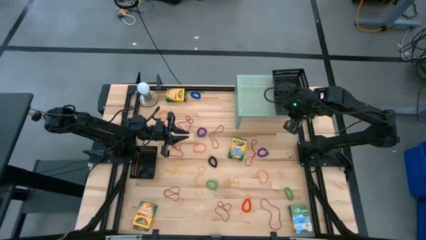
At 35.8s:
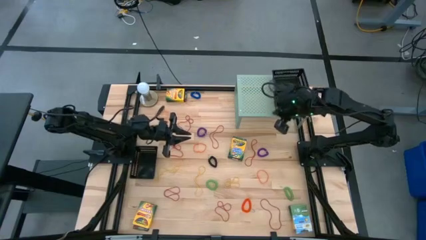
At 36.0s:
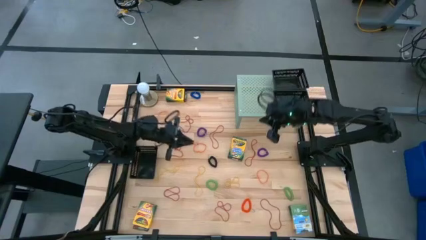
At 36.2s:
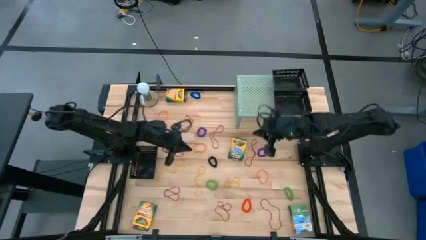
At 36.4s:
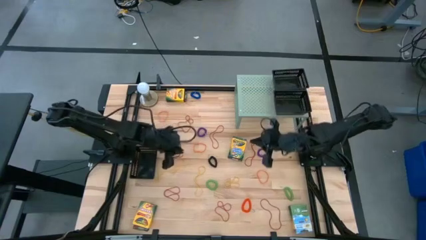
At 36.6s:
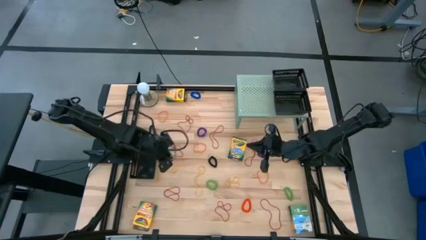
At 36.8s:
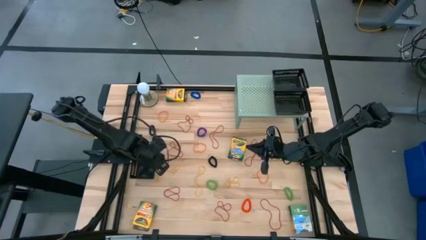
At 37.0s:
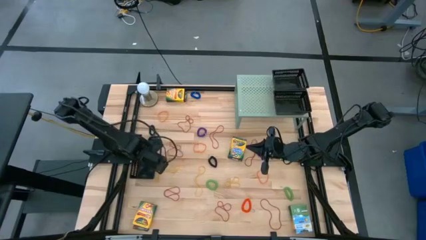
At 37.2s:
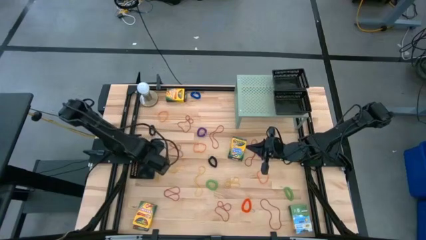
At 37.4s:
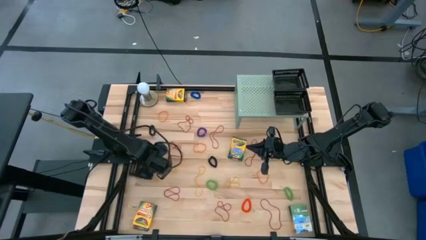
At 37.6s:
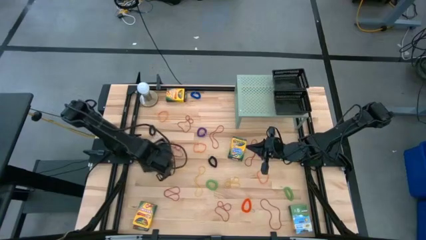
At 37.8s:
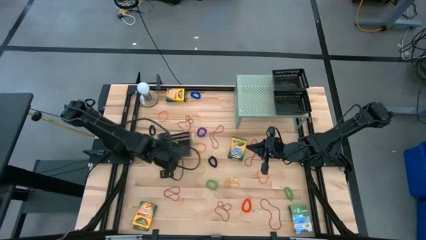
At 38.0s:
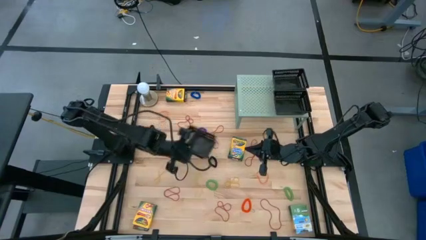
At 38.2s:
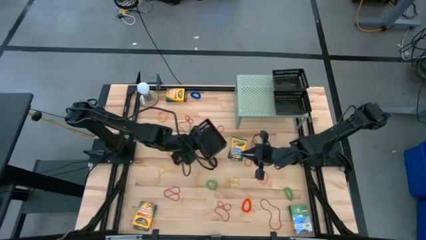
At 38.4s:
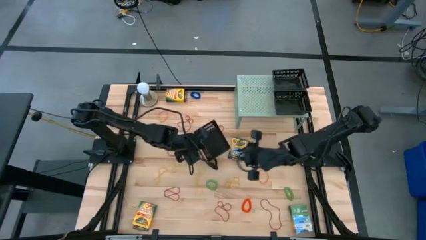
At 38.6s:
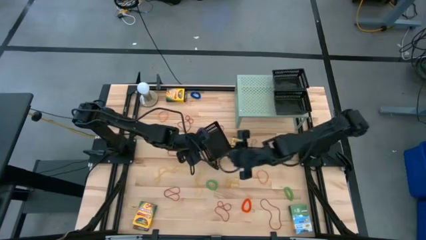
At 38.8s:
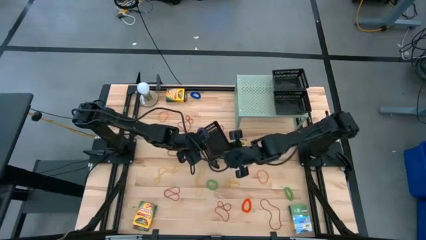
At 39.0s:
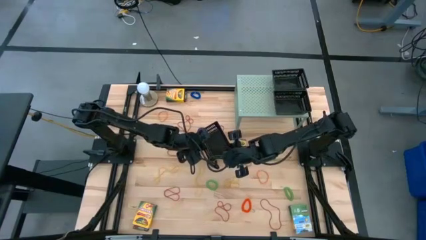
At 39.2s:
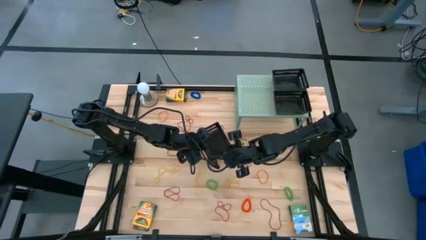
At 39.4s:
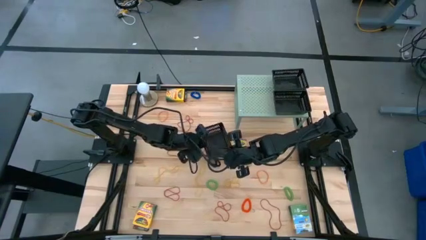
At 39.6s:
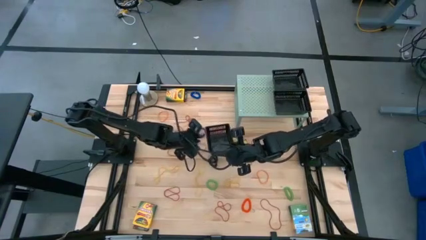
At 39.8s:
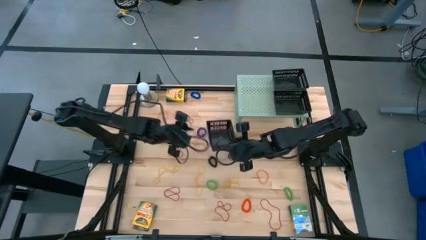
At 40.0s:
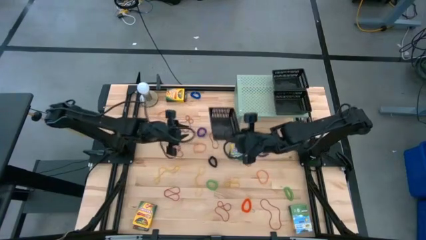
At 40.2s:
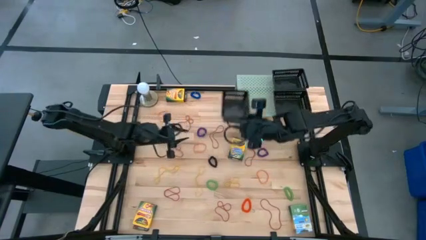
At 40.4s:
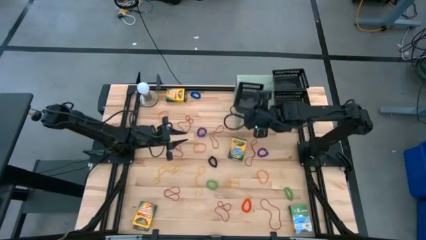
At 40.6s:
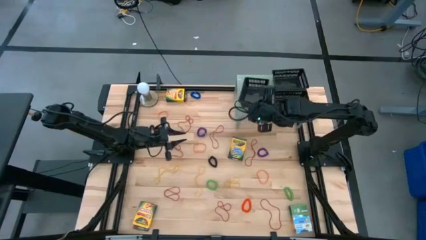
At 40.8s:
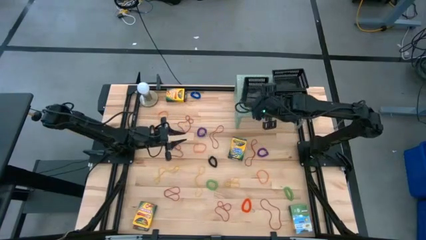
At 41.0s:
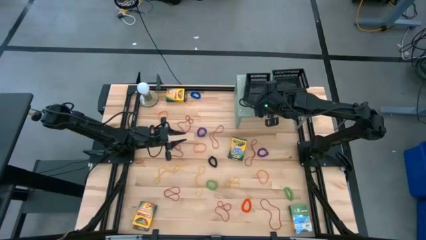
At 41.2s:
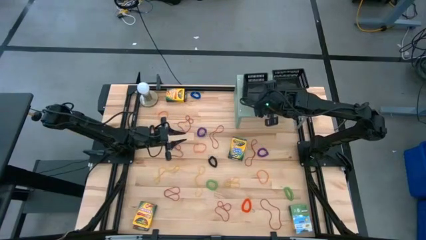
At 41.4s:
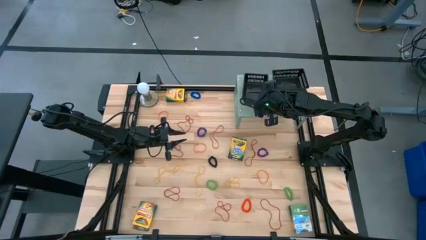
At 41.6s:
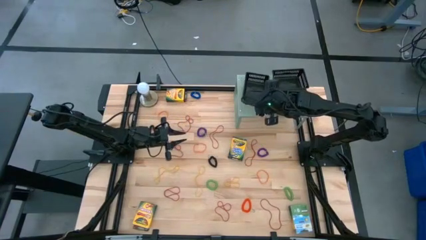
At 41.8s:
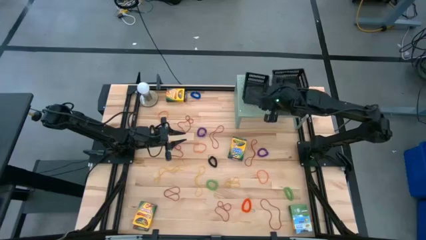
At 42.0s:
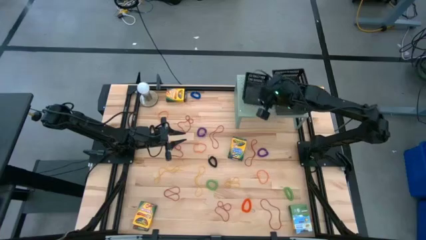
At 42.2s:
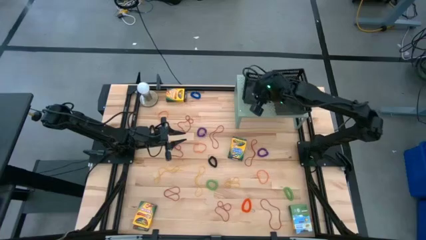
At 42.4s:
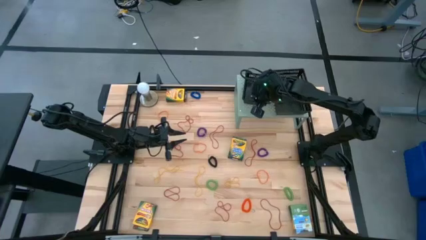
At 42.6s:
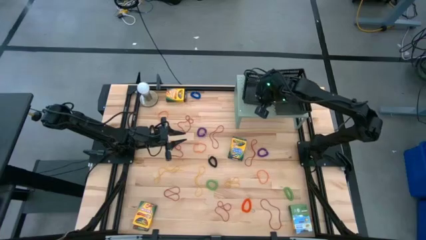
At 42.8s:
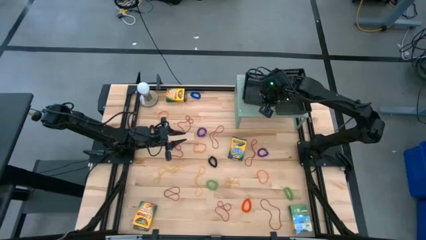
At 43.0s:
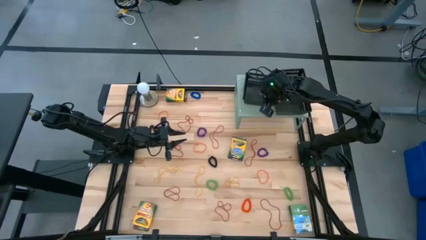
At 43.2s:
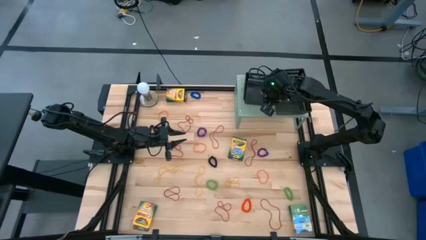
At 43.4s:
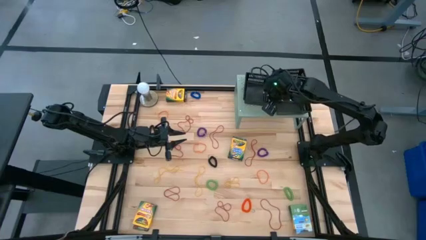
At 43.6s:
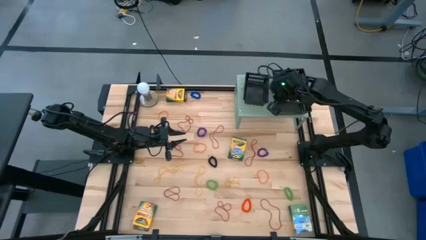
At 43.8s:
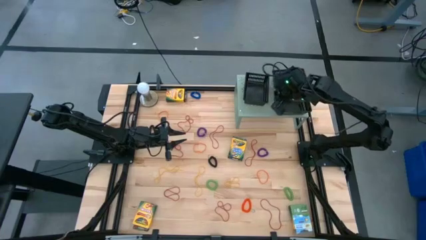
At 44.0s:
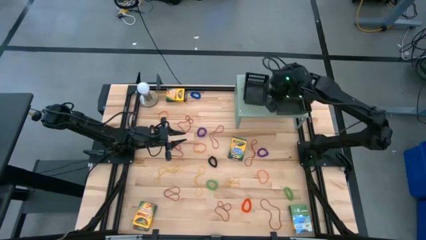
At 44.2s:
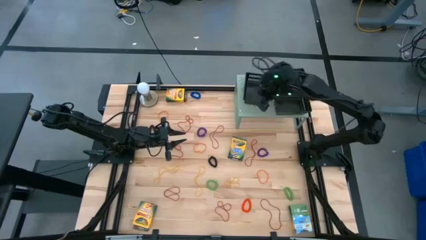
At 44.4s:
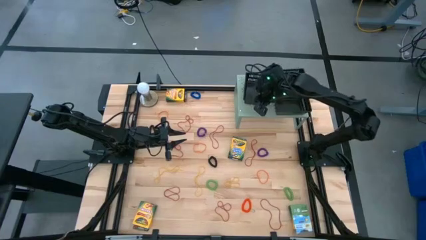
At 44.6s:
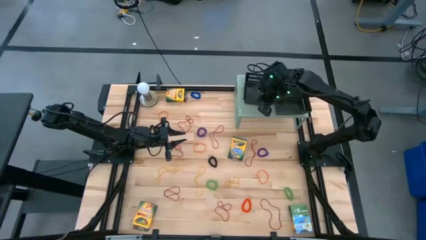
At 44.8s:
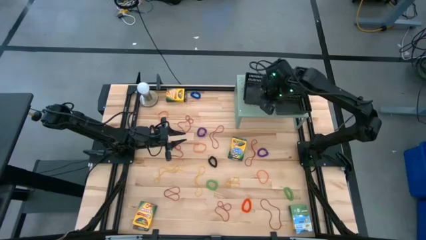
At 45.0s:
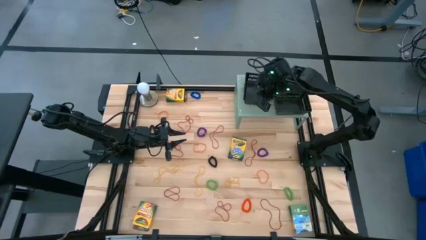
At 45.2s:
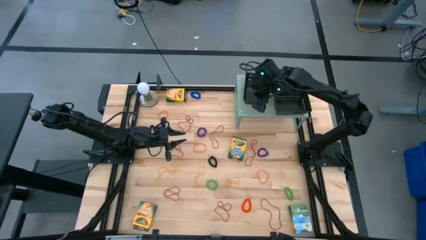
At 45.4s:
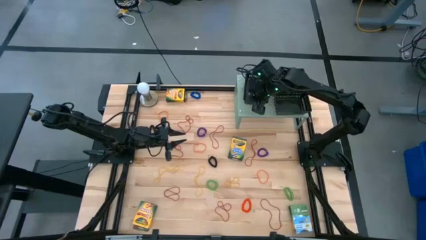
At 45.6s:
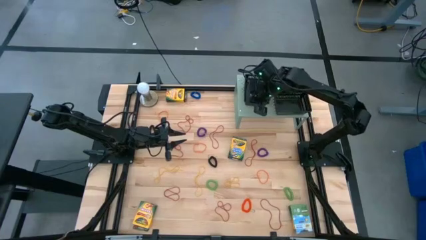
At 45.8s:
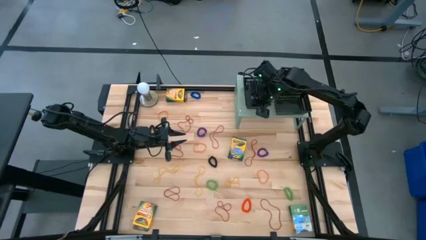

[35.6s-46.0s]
Task: Pick & Place Office Desk Supplies
Put the black bin on the shelf

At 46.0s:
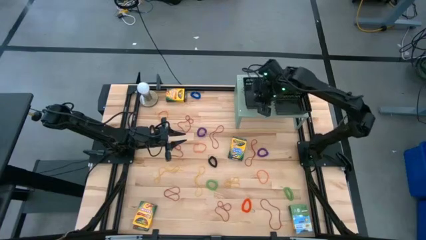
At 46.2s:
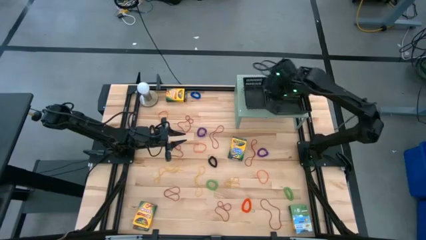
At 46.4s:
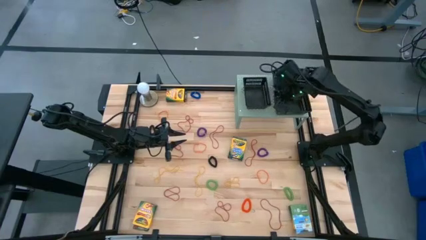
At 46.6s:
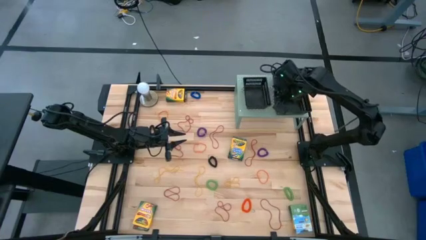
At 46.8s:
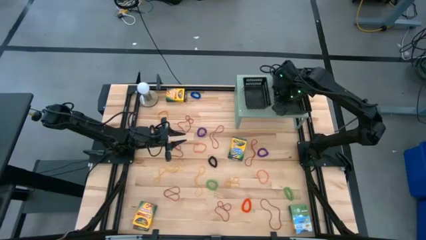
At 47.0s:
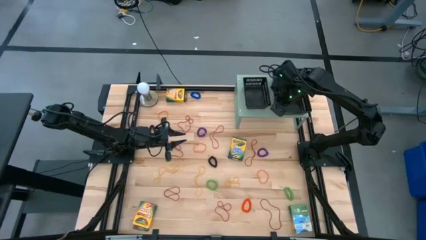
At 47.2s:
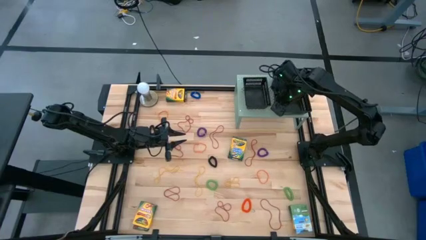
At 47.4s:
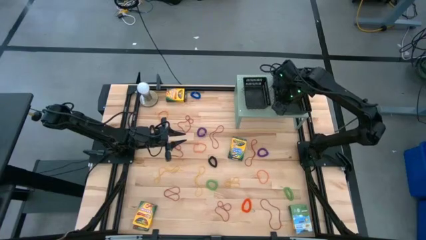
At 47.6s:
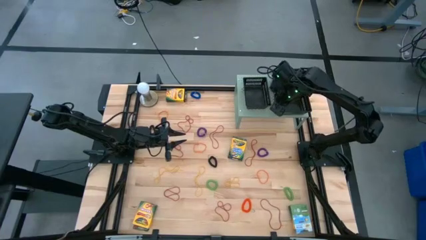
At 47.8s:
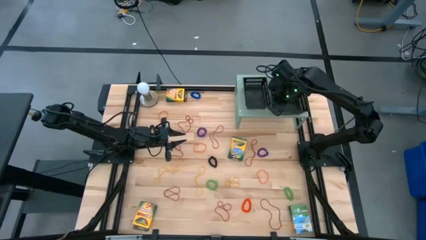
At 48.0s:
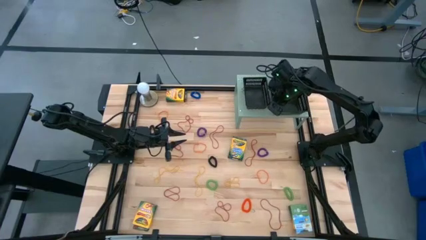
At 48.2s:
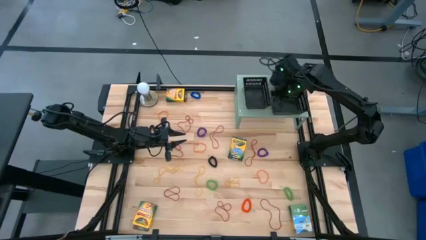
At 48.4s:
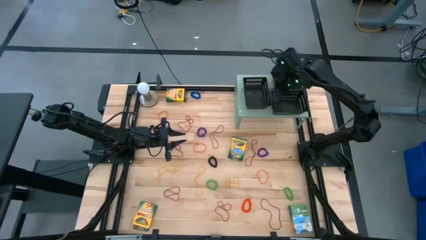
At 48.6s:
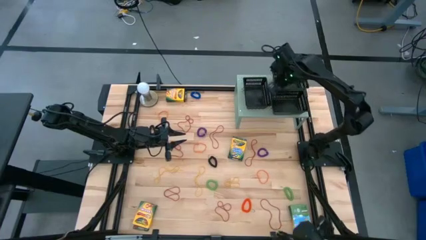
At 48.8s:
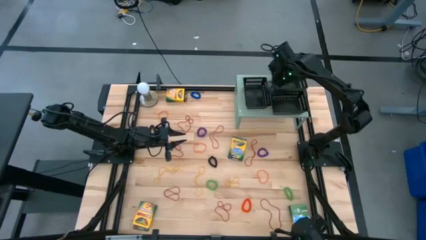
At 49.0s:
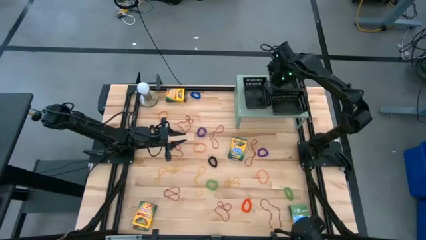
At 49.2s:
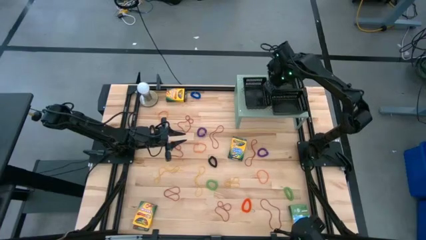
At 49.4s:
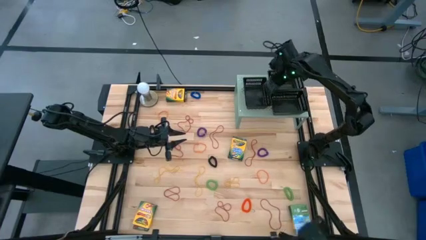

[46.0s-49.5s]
Adjust the black bins on the shelf

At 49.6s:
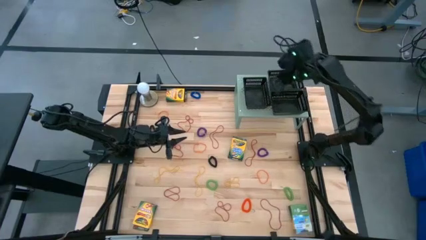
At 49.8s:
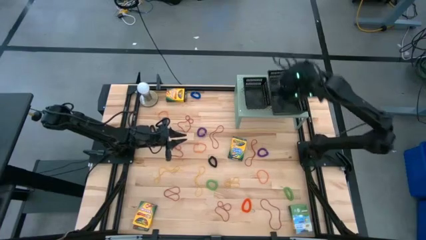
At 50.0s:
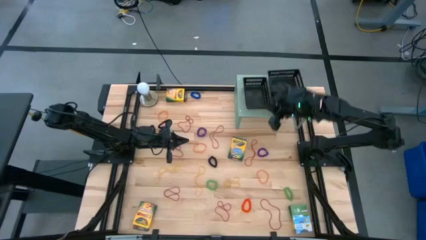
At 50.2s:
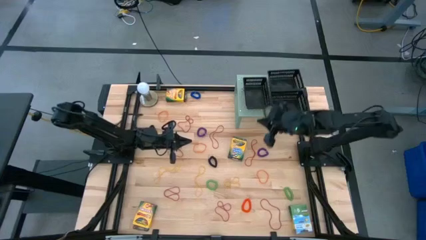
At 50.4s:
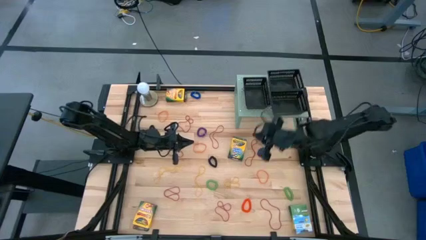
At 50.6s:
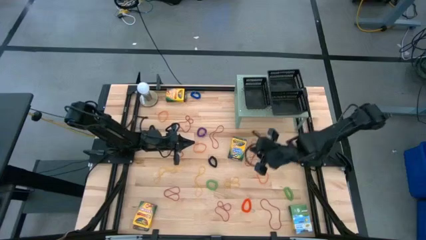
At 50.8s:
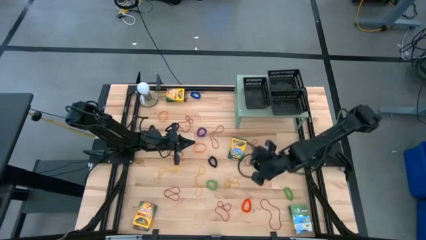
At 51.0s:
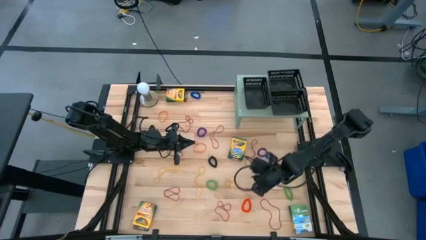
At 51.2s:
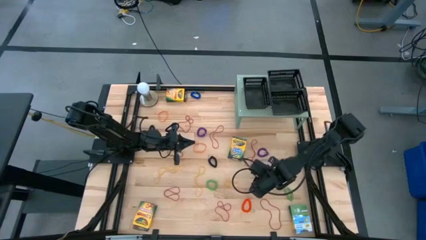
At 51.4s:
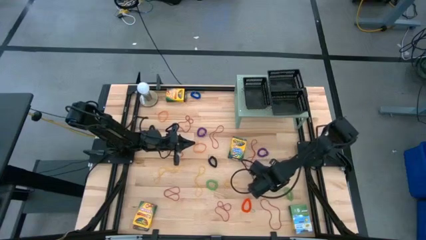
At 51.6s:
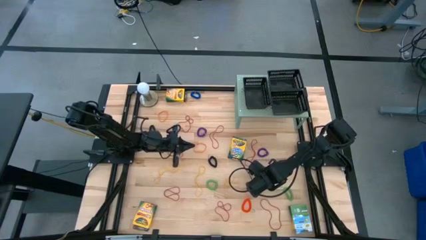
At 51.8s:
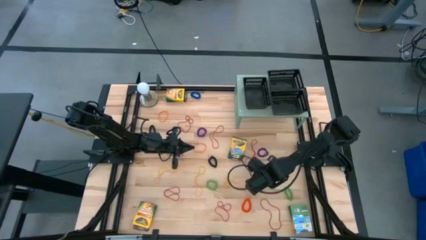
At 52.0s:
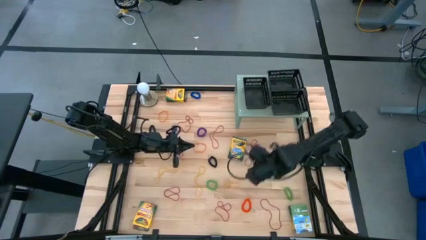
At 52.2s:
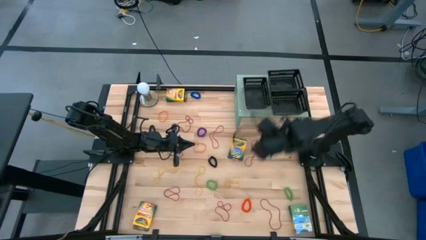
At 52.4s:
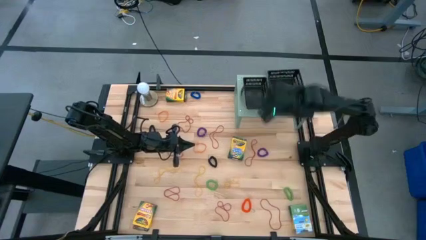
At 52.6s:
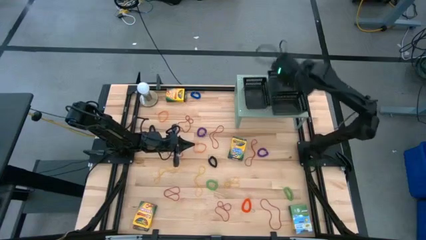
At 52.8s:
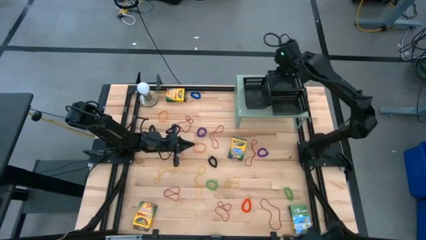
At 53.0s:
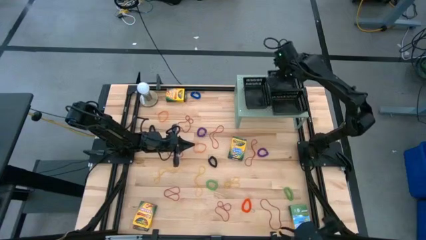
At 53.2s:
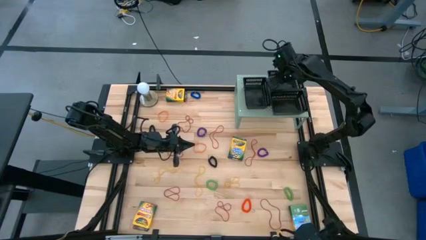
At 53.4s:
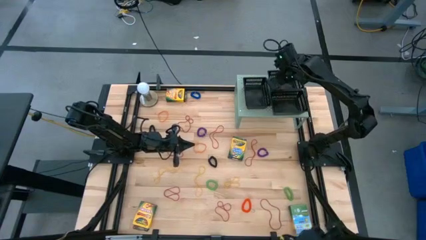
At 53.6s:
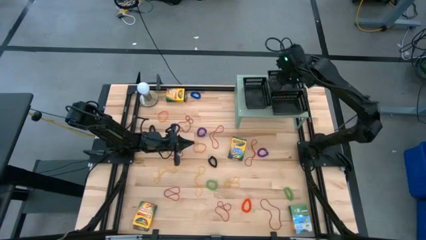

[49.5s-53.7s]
Put the orange rubber band into the top right black bin on the shelf
